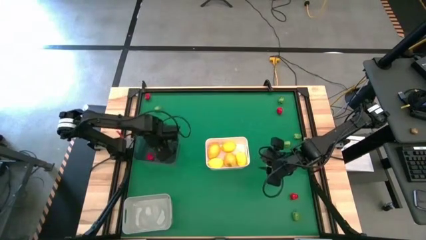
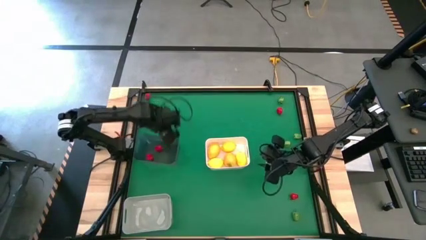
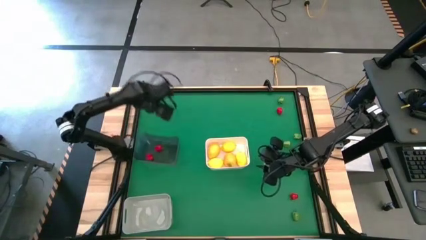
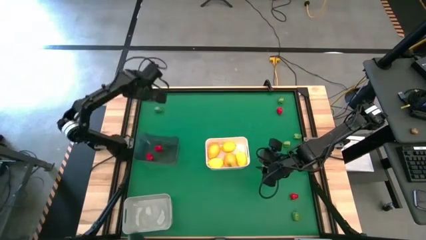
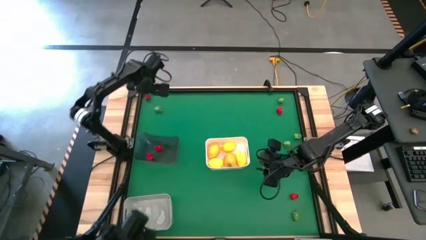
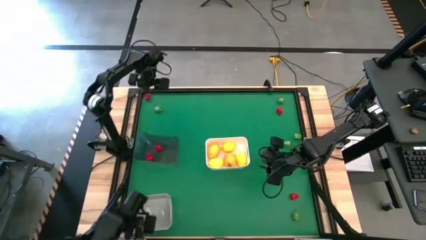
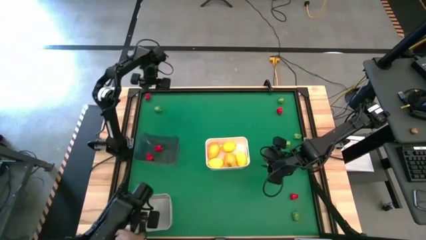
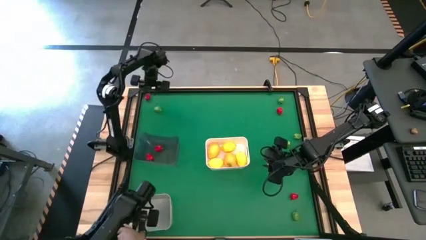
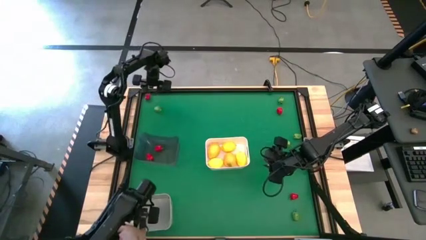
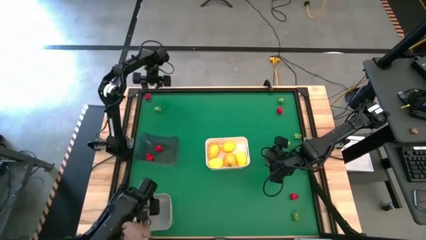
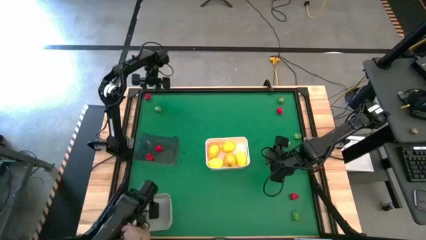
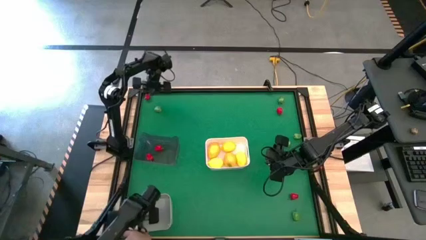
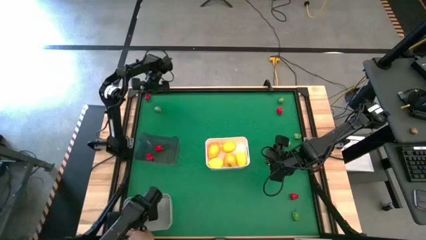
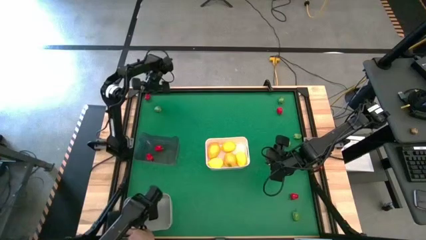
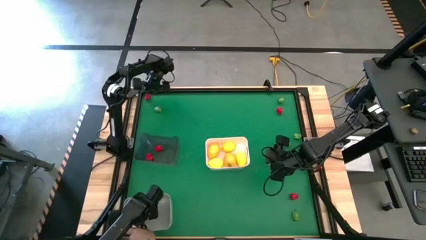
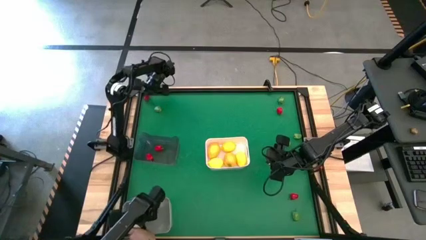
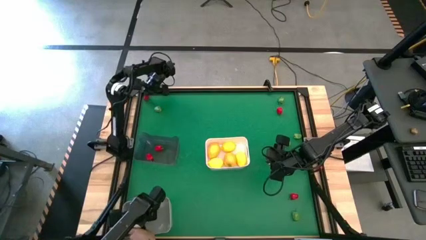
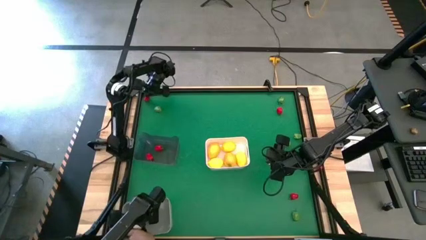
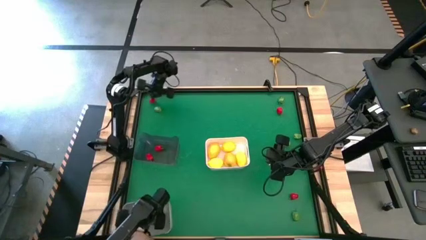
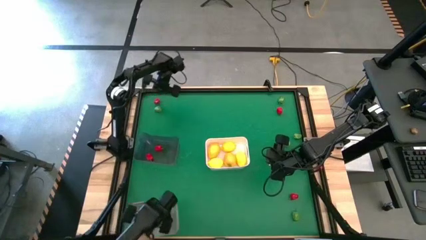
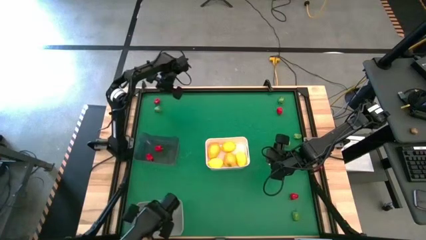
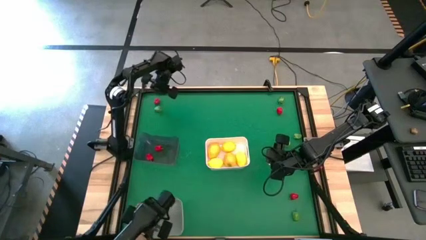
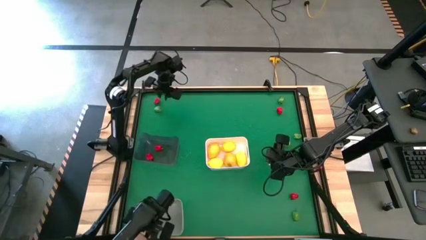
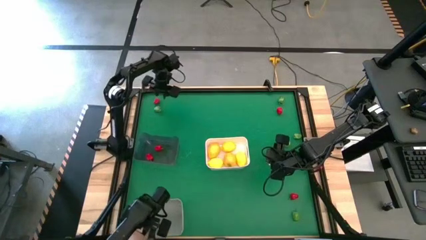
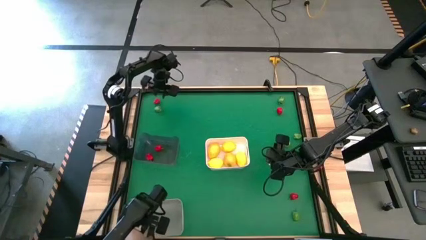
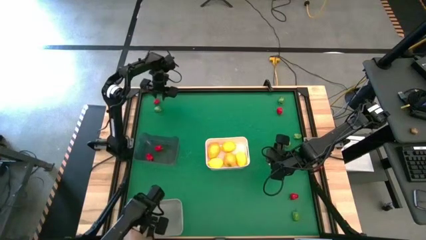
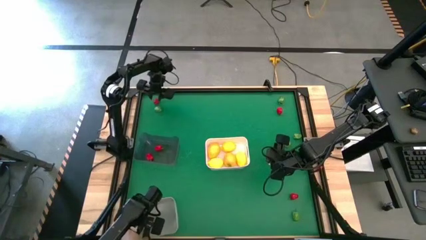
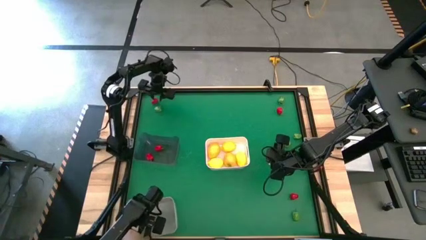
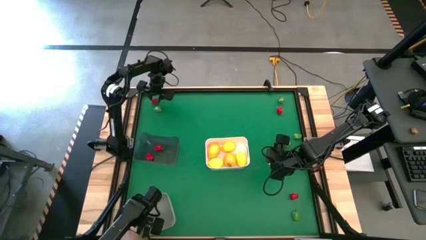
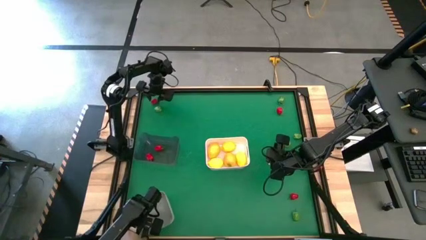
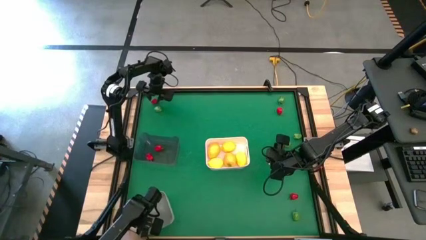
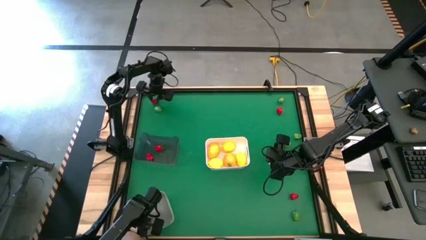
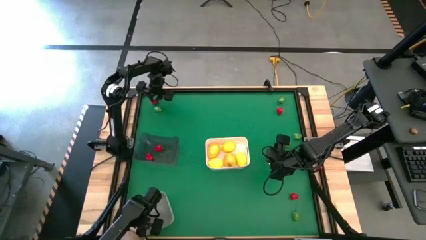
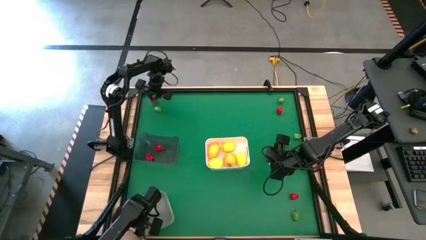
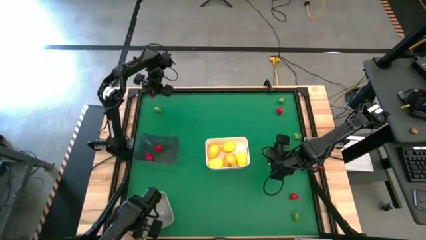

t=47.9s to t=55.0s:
Task: Sort produce into baskets
Put the red chili pepper into the black bin

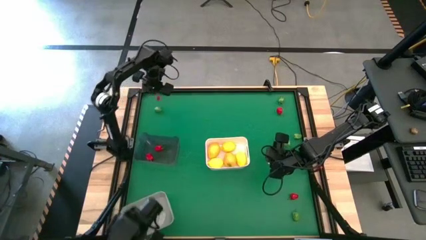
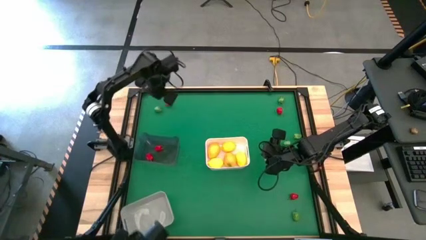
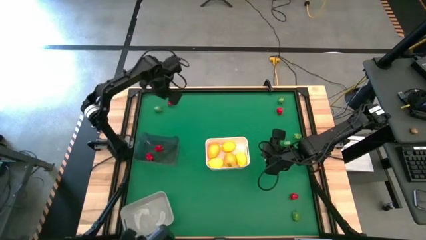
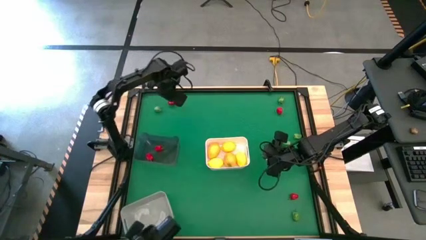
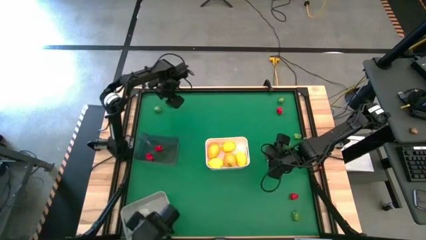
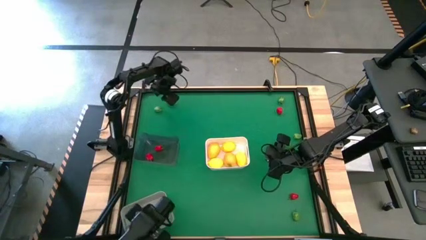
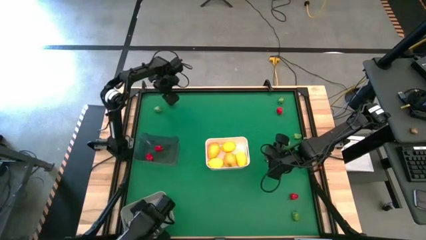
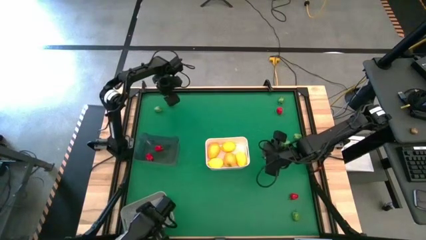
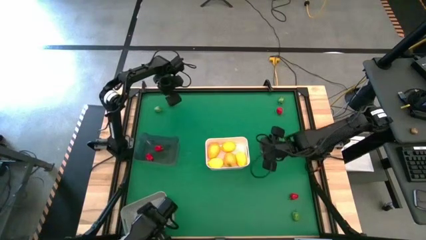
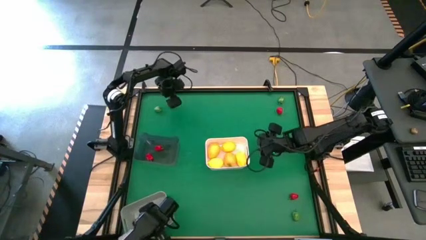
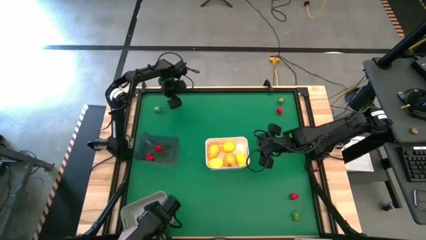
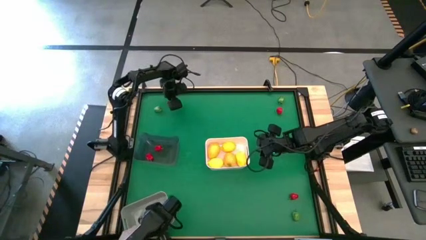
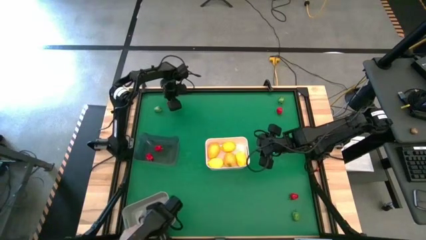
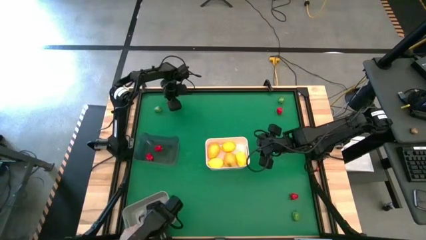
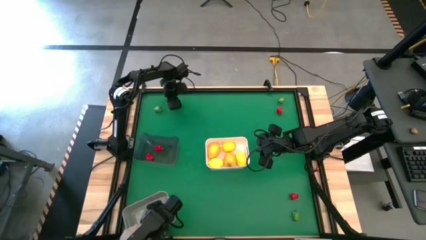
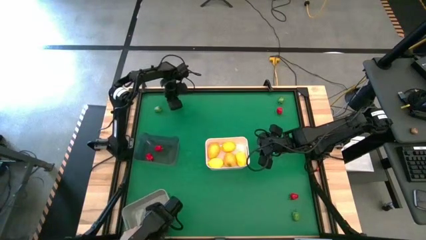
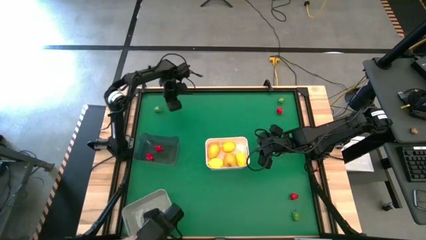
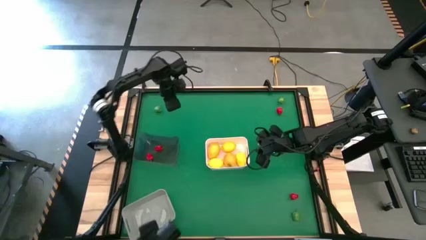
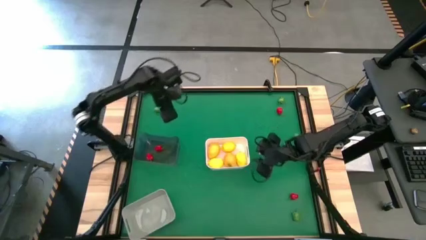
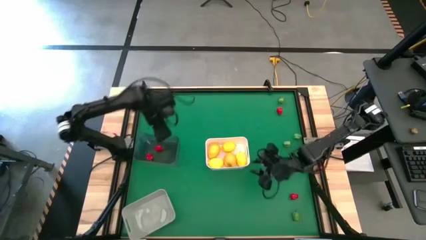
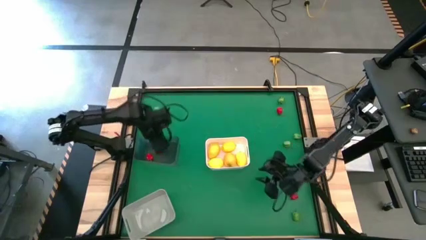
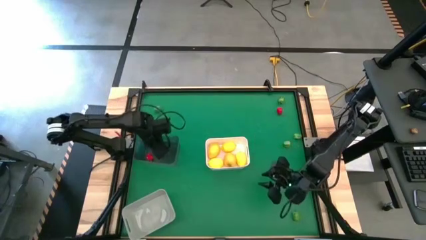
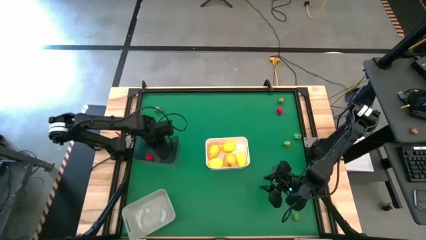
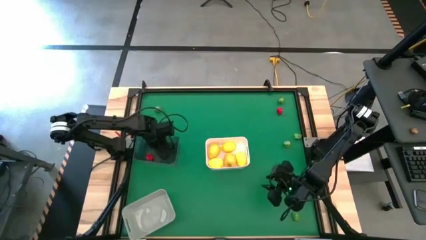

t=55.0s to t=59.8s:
Put the red chili pepper into the black bin

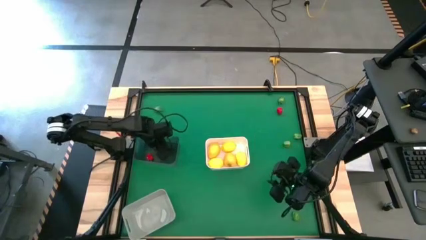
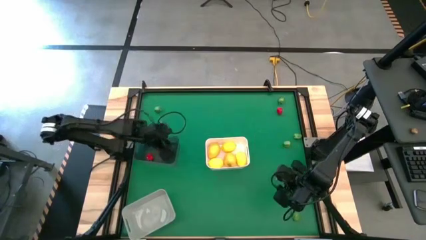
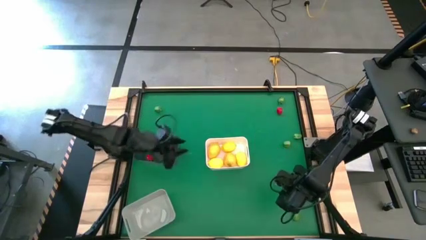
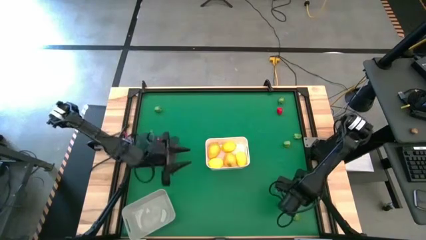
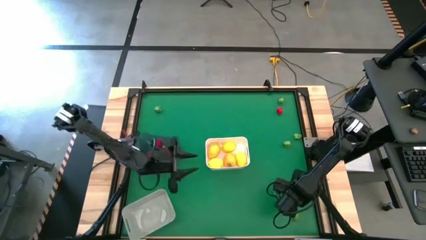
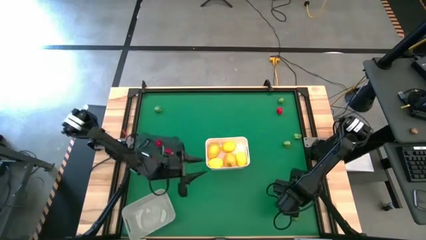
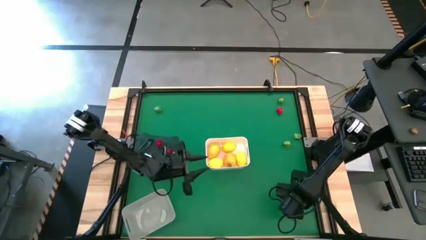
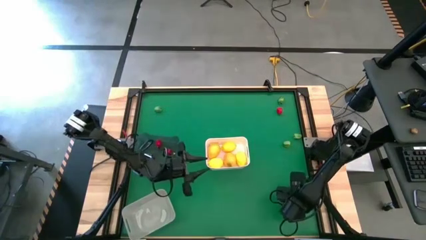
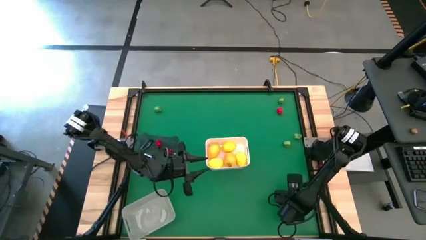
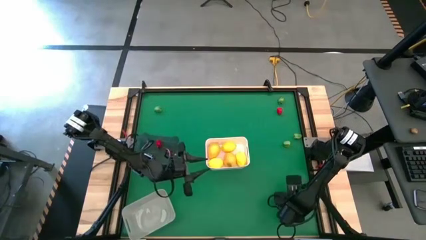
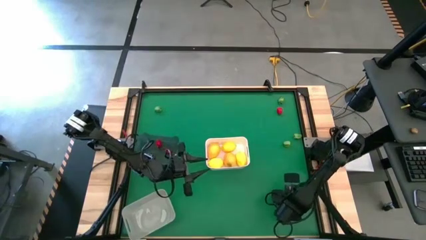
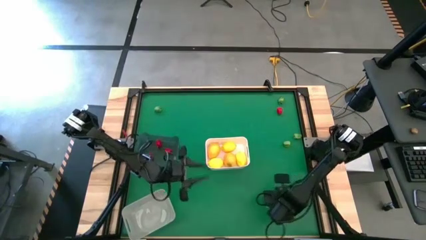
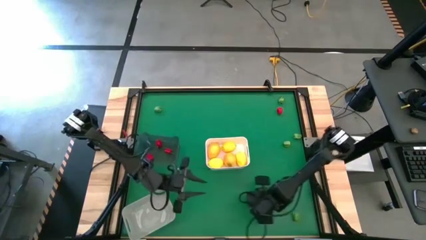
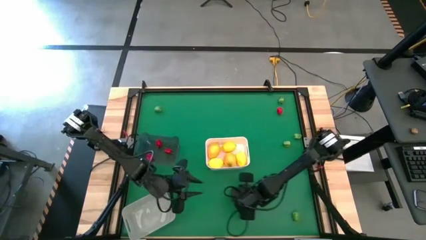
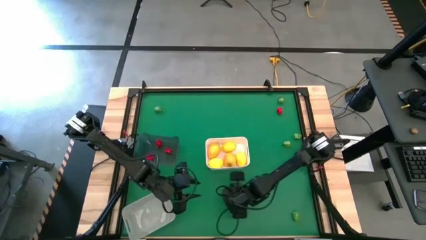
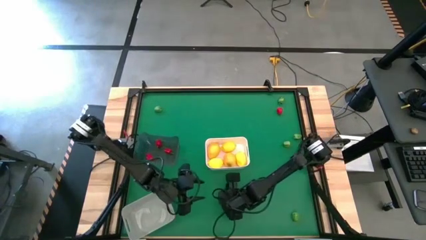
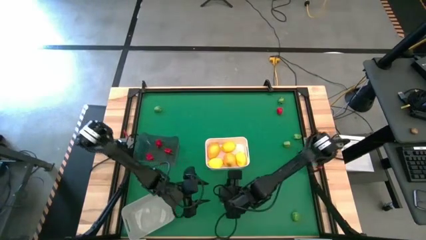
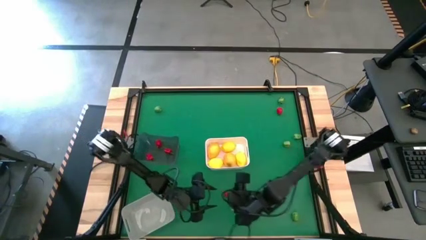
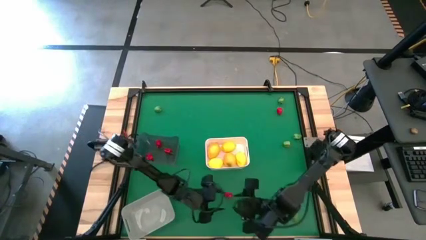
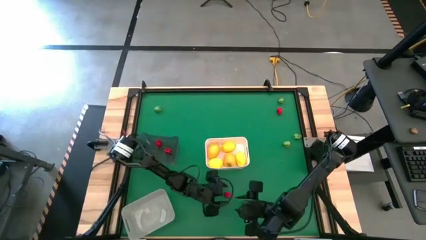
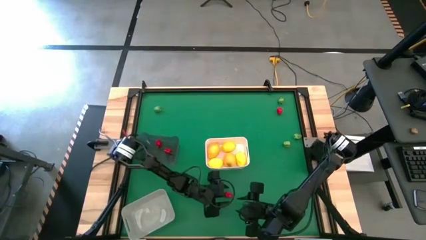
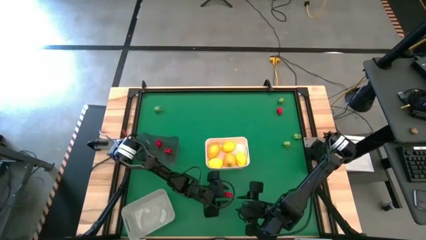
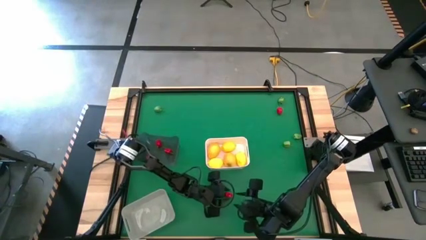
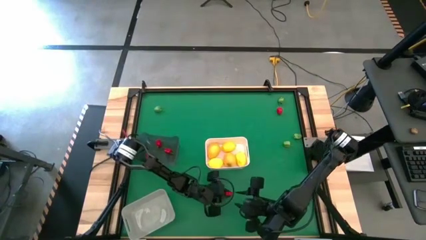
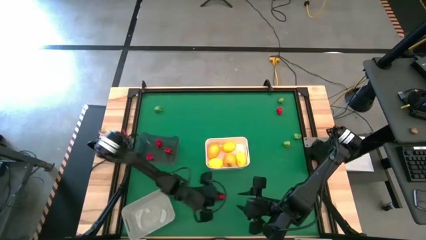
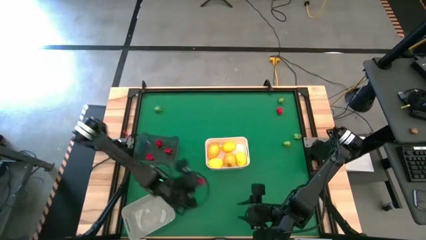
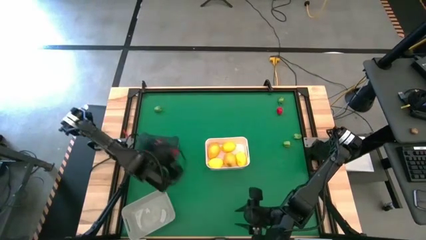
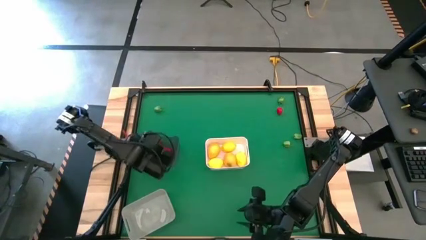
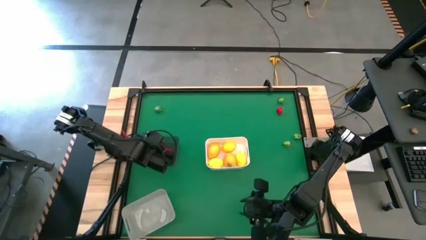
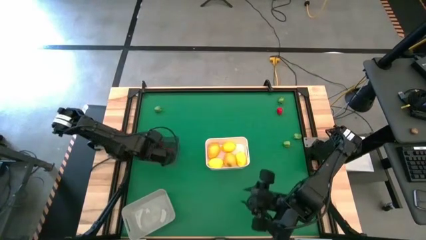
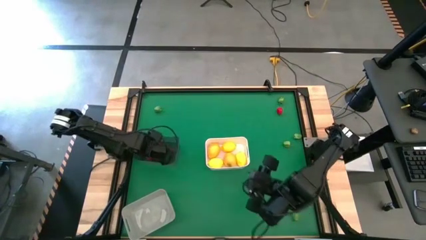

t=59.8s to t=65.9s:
Put the red chili pepper into the black bin
